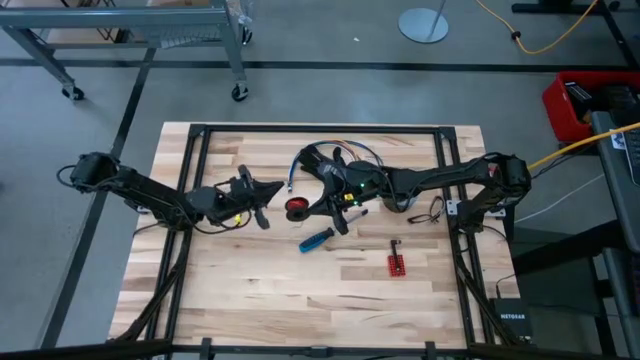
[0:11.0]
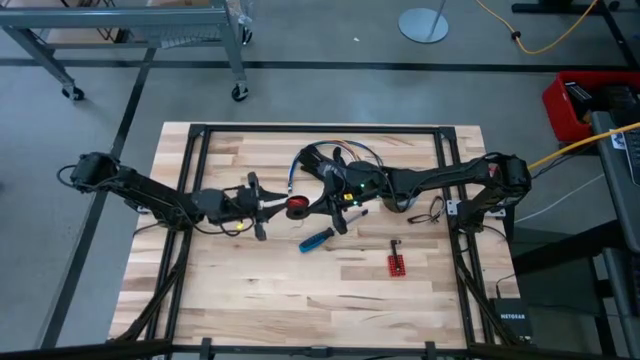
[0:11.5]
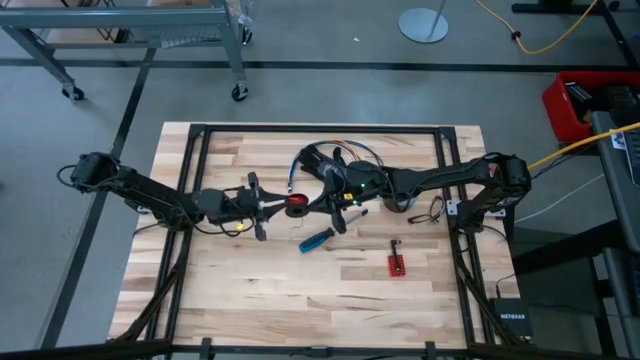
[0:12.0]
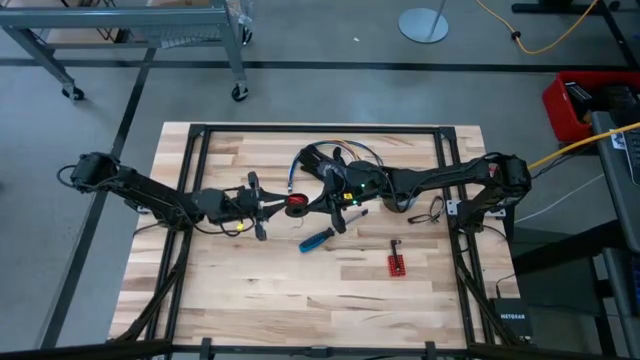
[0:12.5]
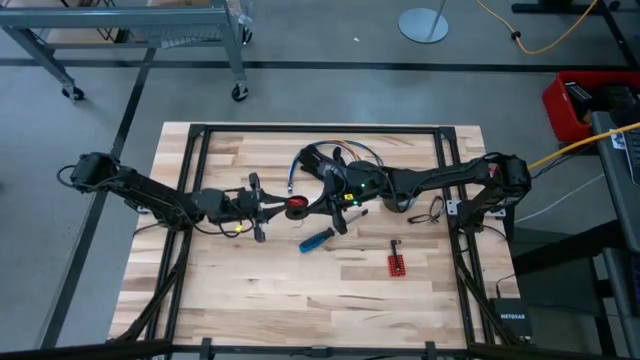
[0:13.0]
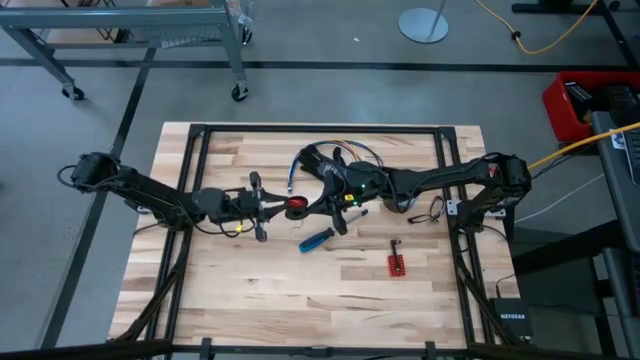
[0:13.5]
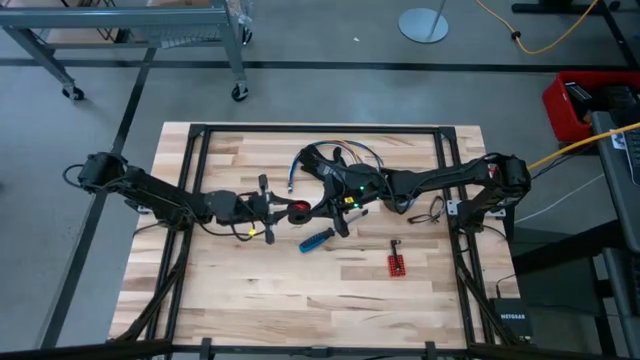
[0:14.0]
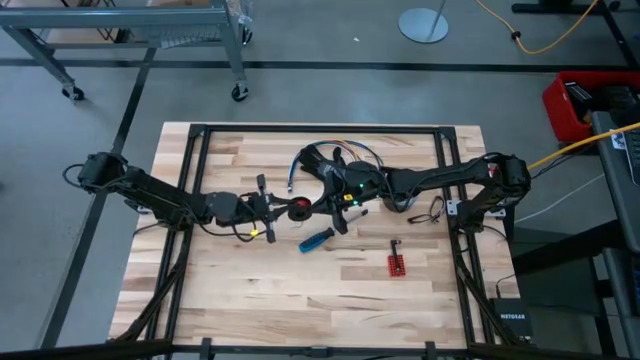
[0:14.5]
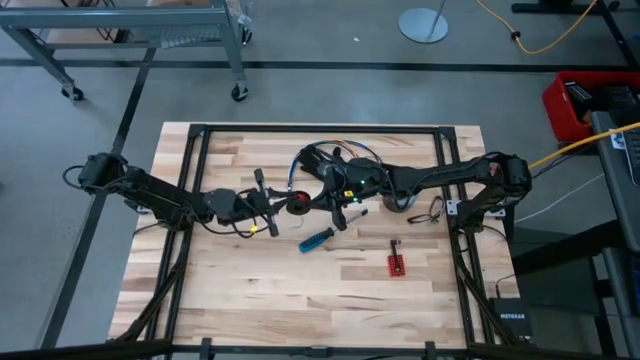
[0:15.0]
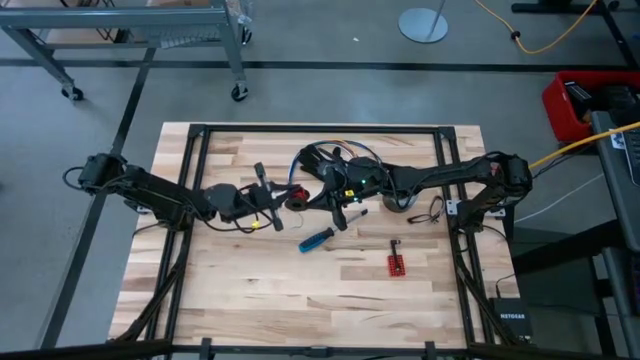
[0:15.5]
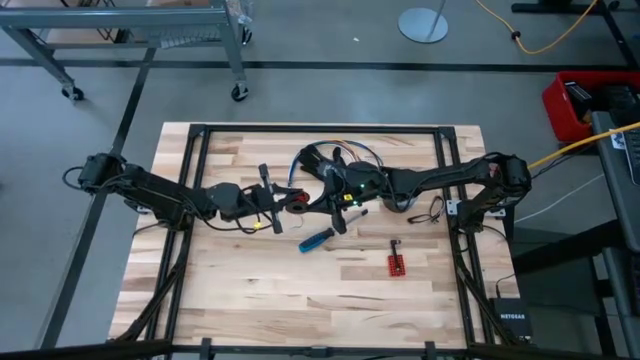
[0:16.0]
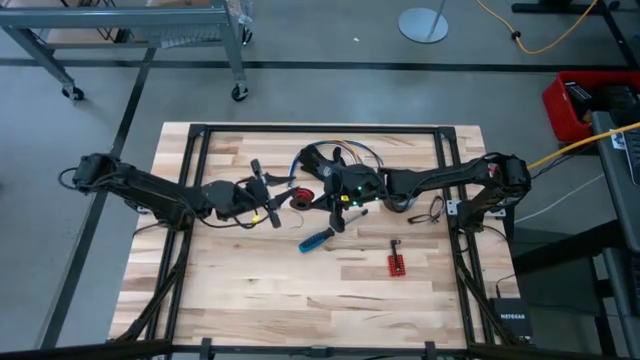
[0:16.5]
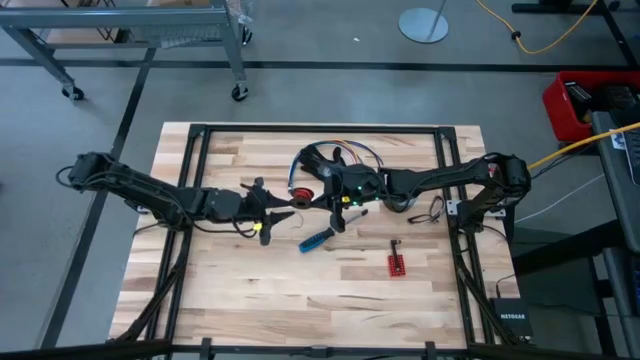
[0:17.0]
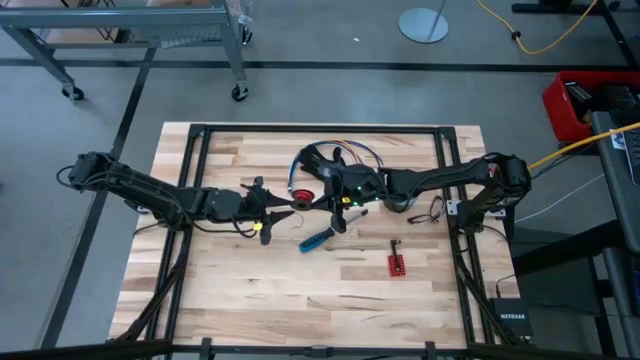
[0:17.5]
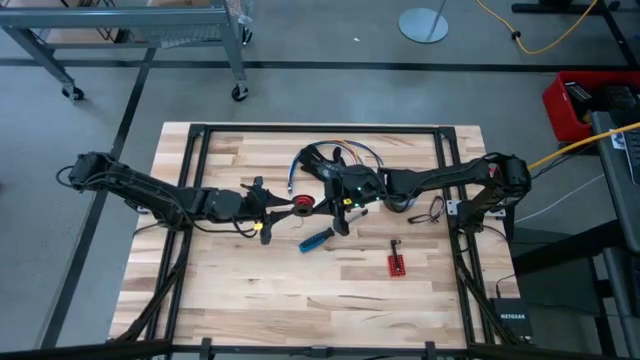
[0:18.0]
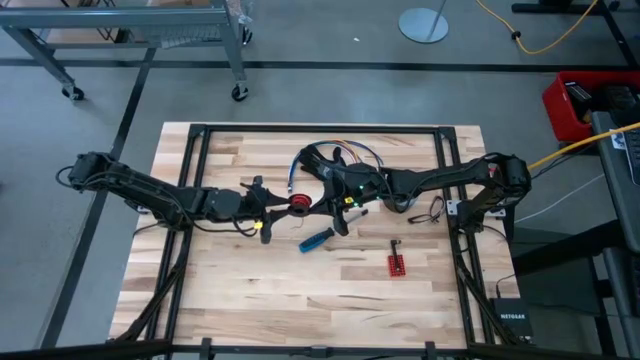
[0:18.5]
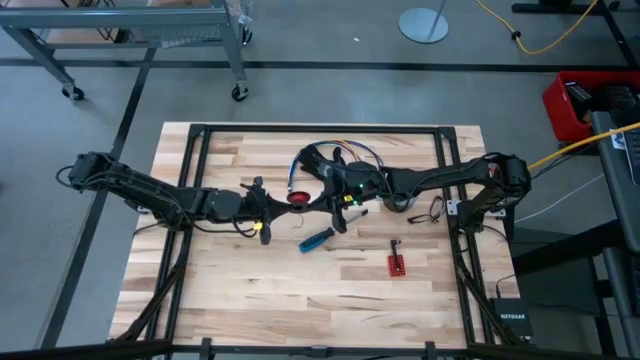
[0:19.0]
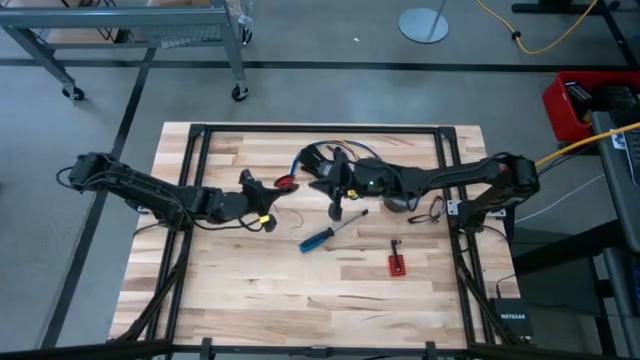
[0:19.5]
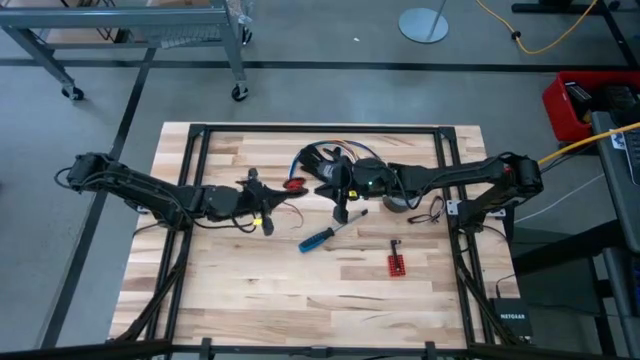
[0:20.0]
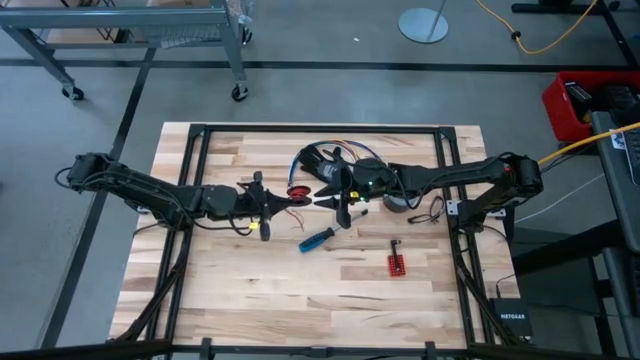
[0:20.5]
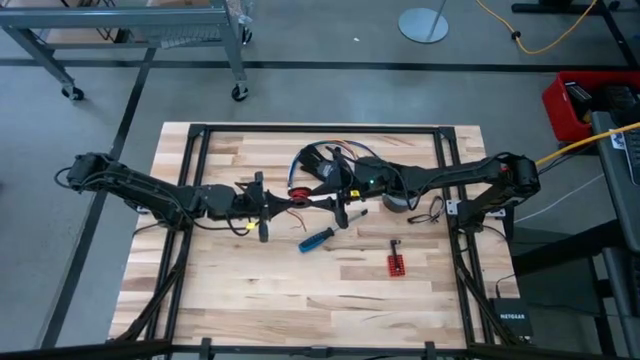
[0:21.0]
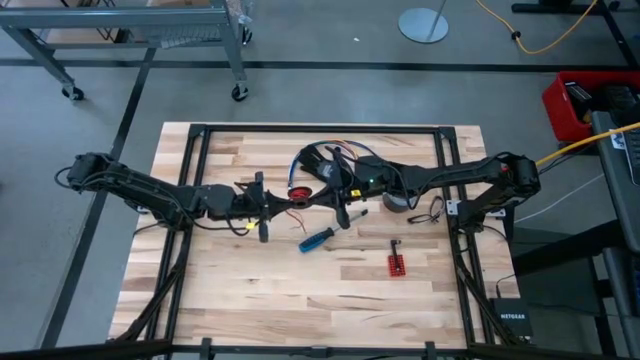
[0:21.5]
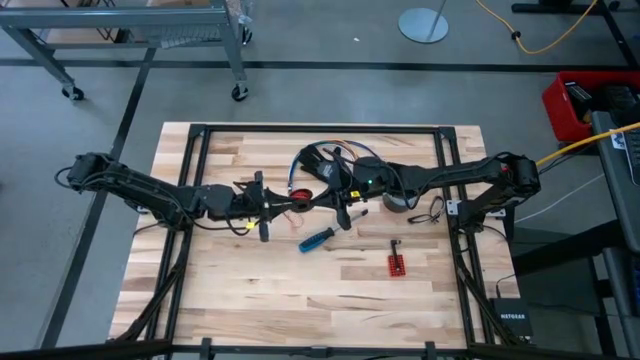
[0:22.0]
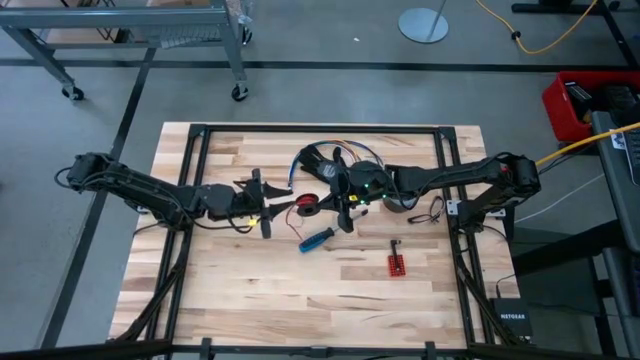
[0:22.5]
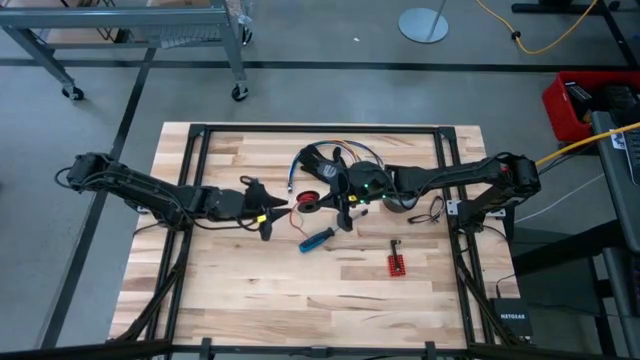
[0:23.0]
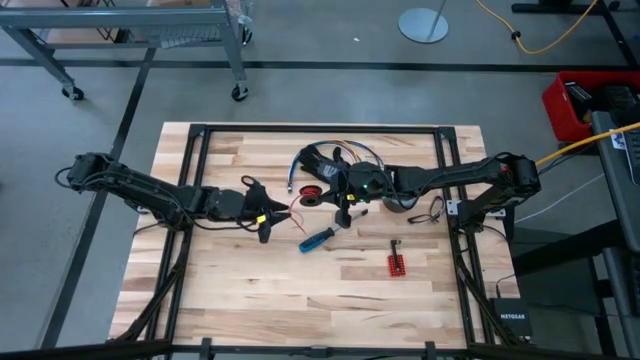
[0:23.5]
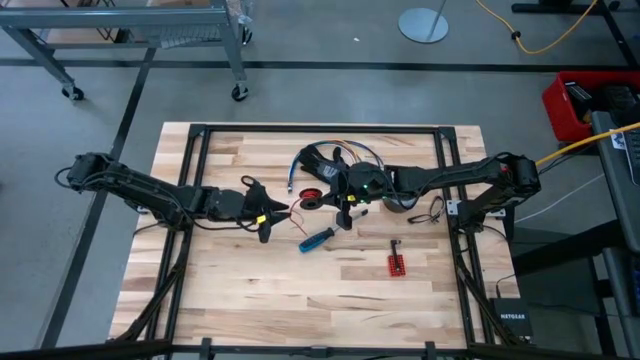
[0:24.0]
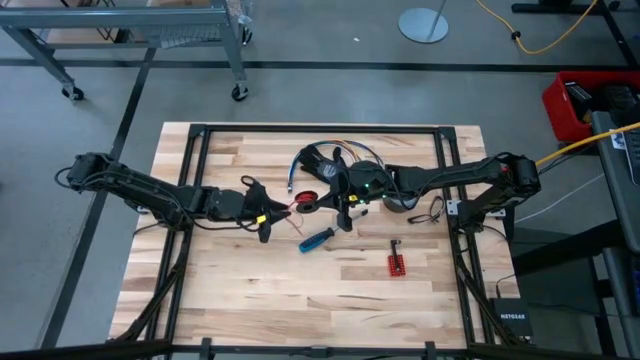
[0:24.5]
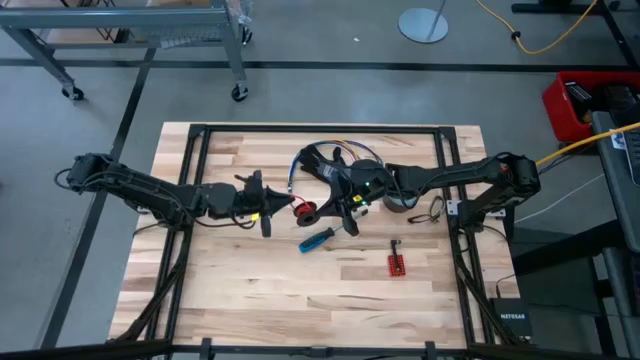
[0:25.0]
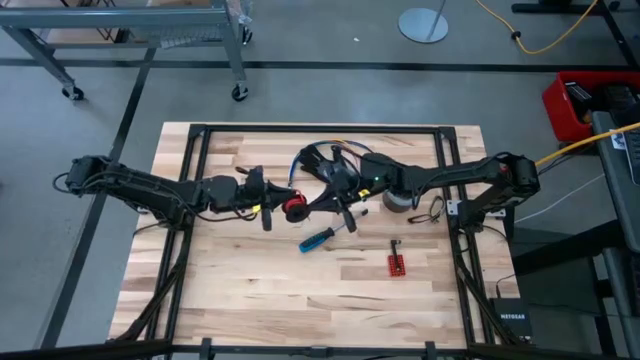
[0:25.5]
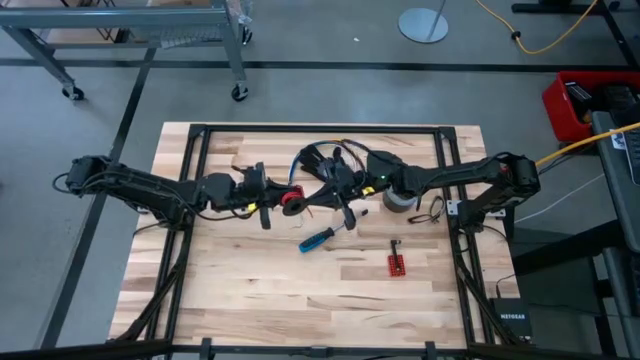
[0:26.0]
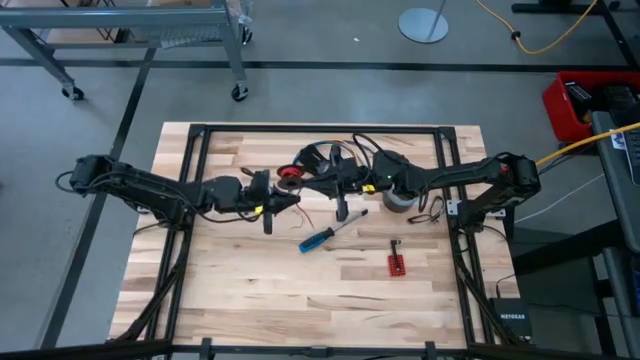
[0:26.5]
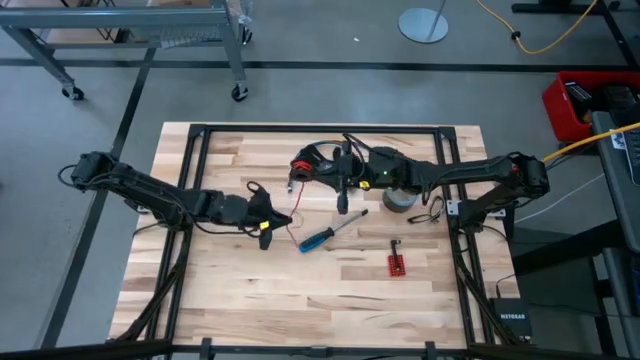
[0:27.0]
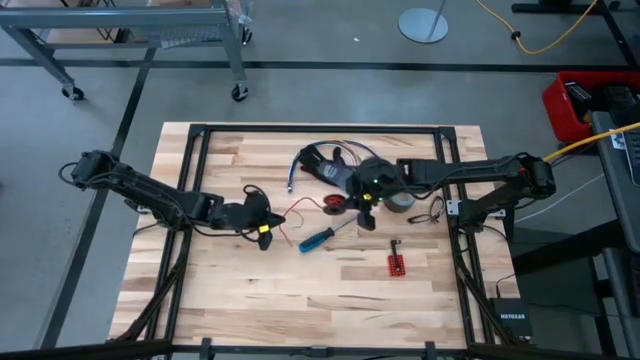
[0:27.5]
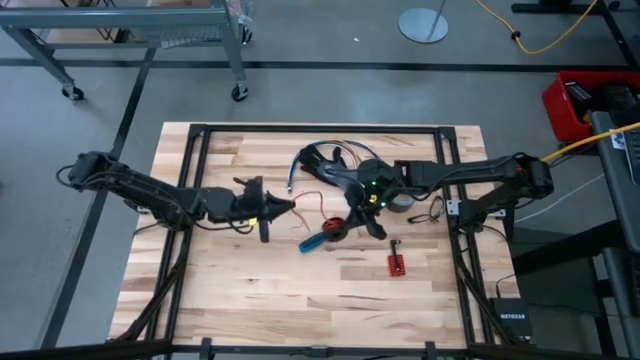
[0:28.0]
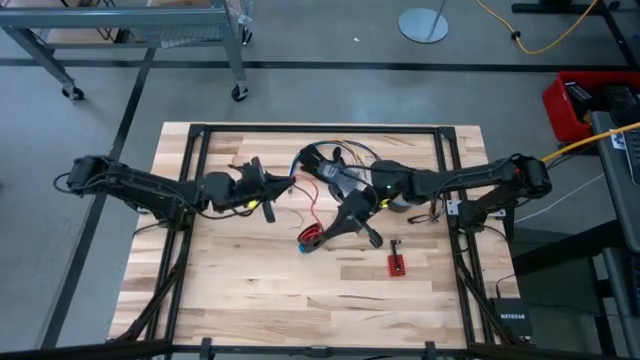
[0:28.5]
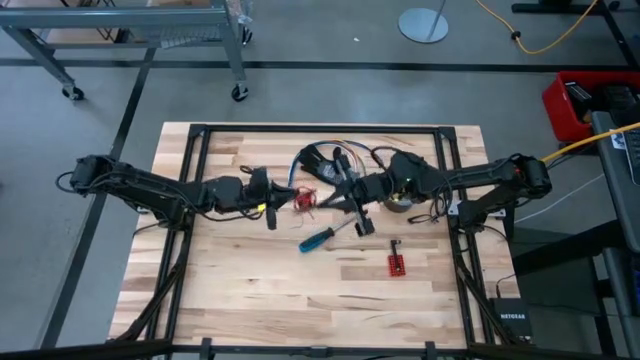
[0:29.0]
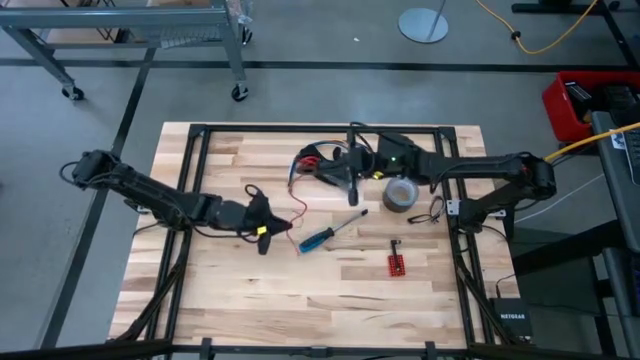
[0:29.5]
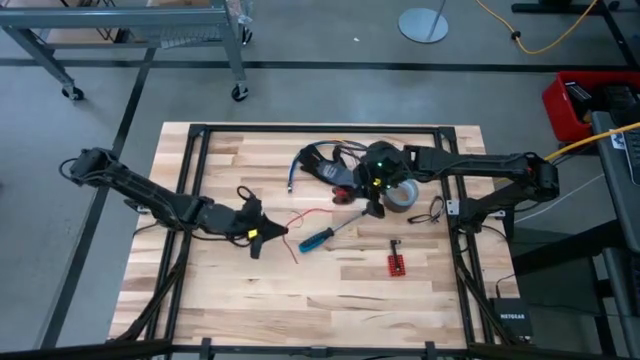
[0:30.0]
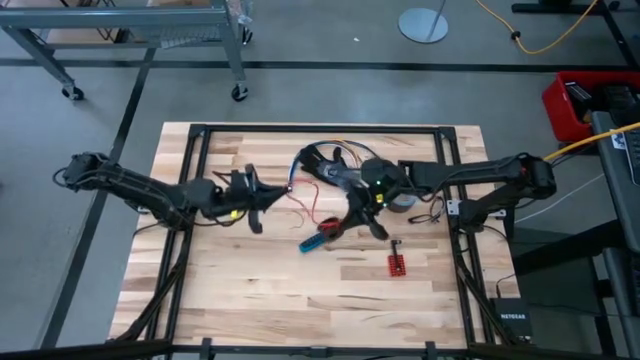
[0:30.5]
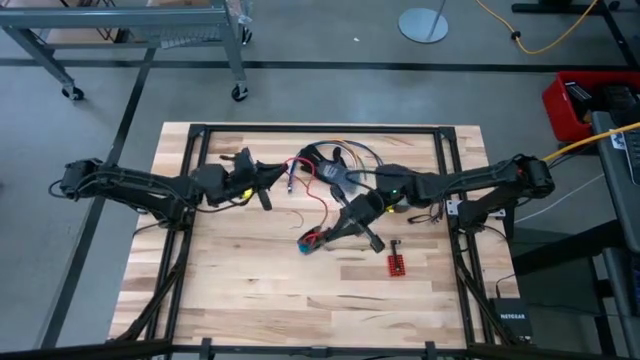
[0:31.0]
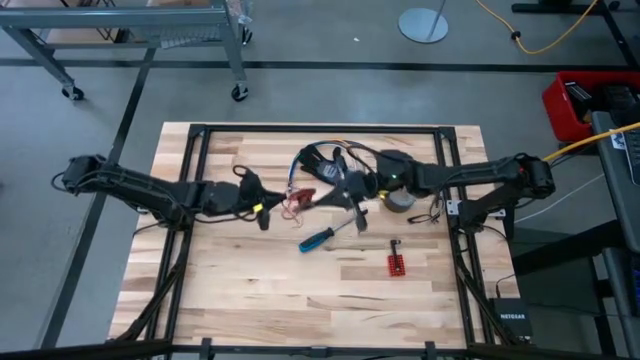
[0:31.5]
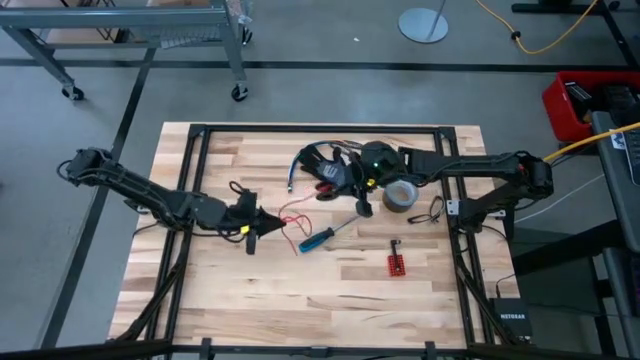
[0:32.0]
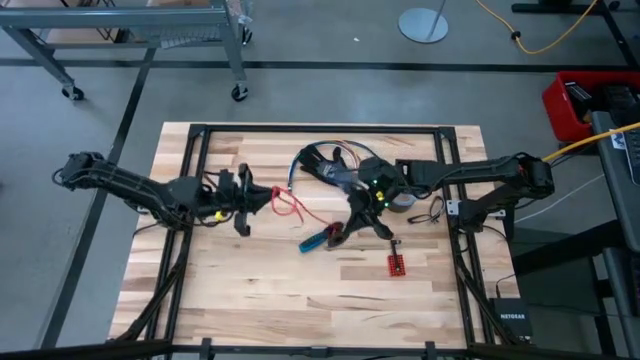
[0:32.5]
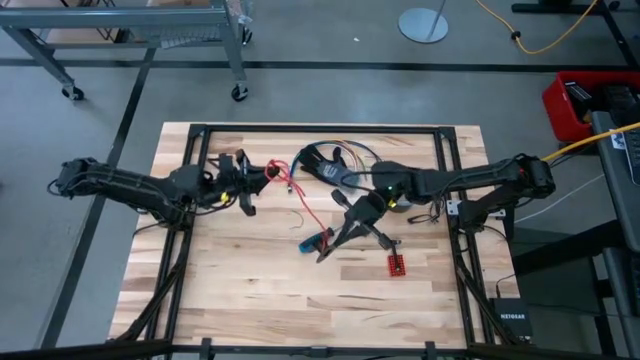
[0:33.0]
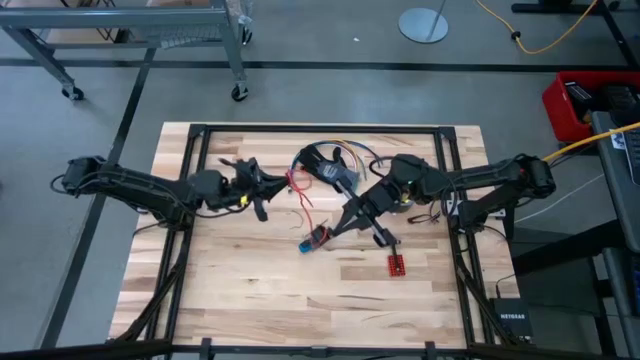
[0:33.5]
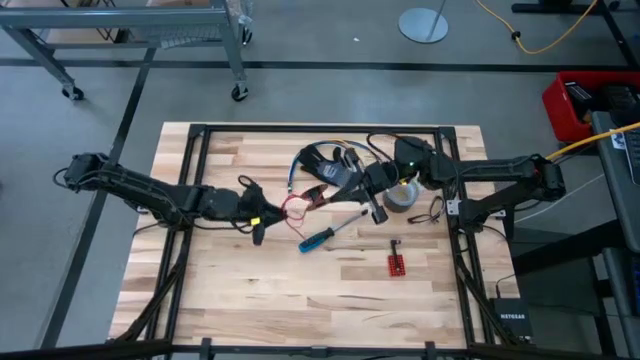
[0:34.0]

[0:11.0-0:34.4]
Task: Coil cords
Uncoil the red wire from the spool
